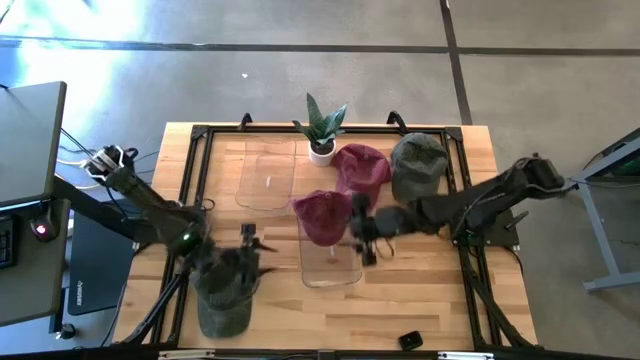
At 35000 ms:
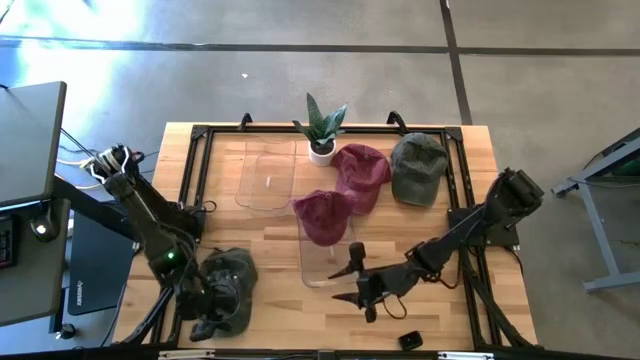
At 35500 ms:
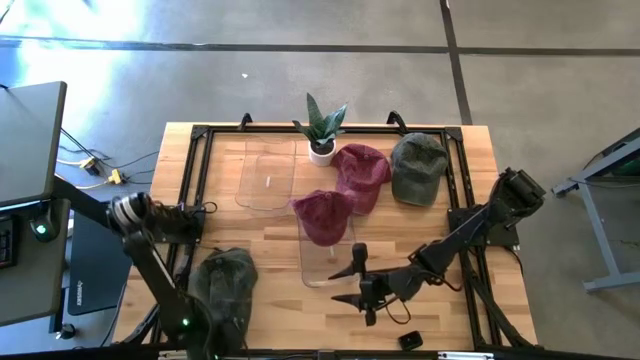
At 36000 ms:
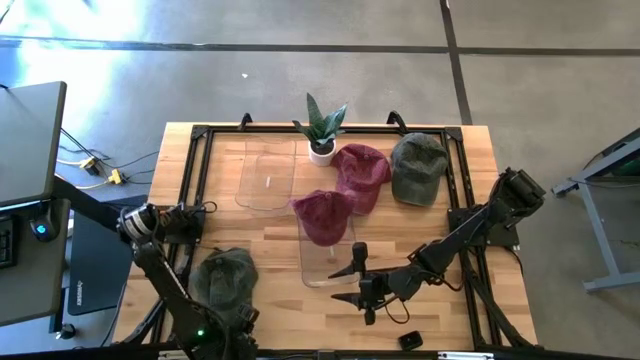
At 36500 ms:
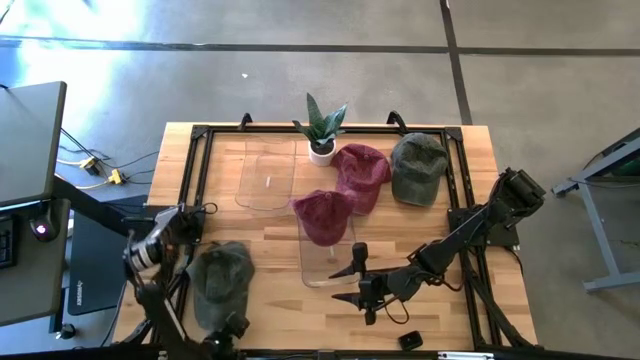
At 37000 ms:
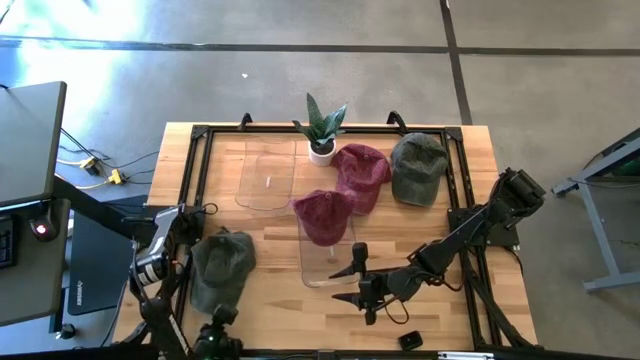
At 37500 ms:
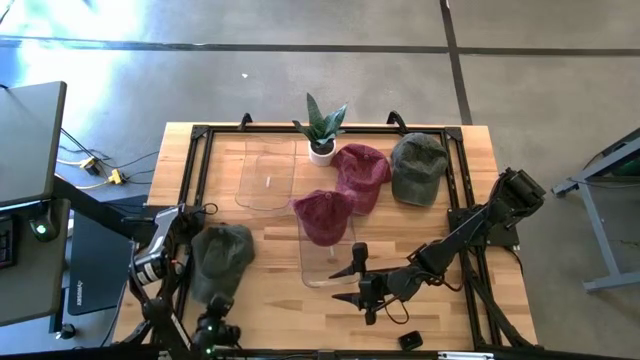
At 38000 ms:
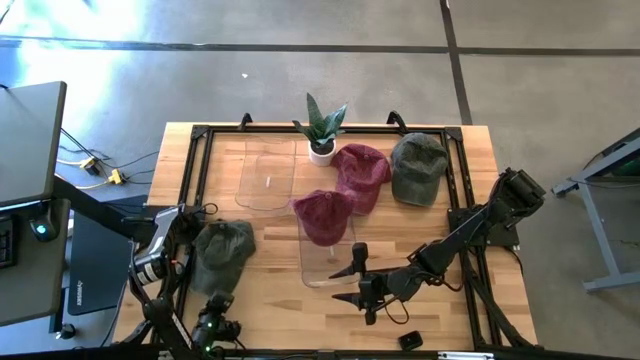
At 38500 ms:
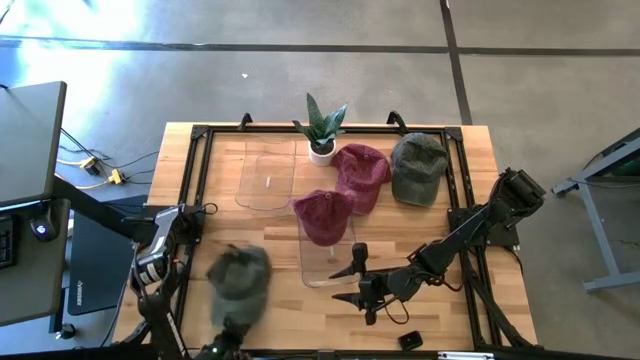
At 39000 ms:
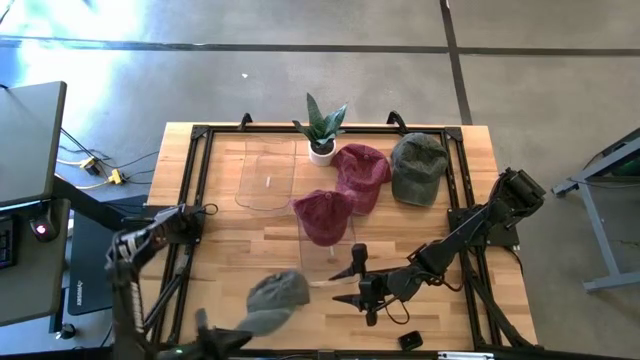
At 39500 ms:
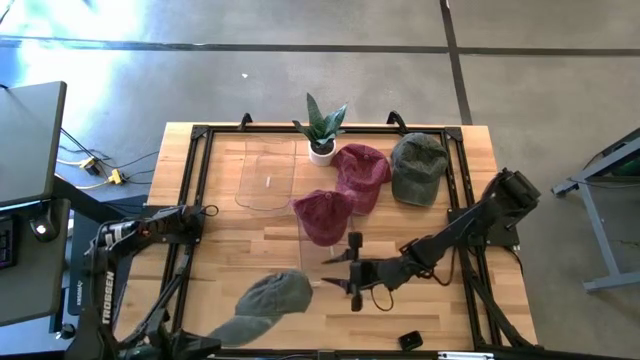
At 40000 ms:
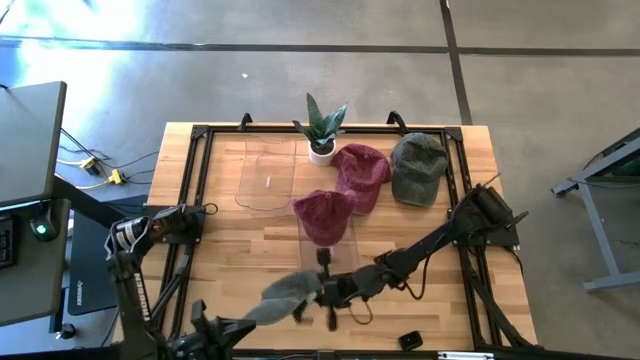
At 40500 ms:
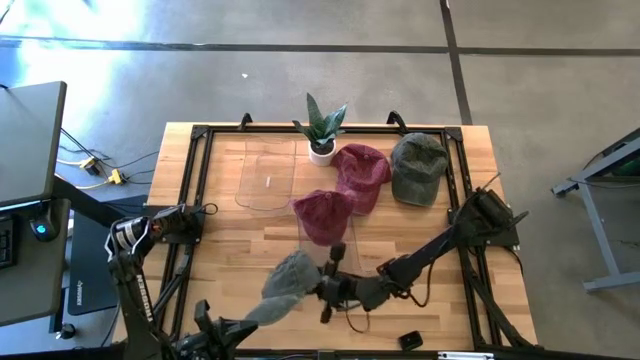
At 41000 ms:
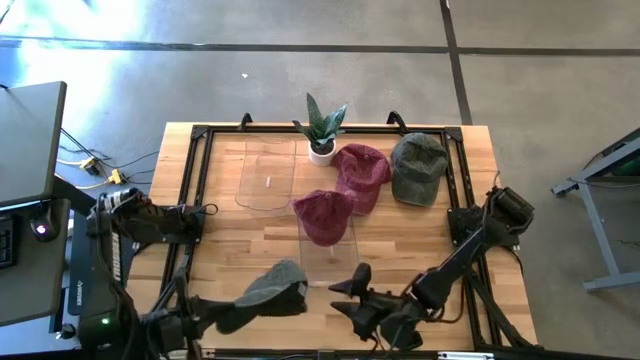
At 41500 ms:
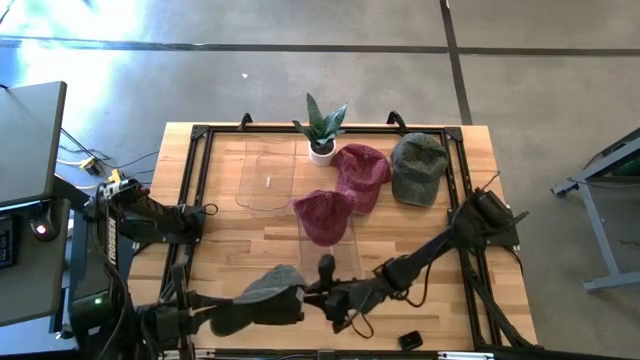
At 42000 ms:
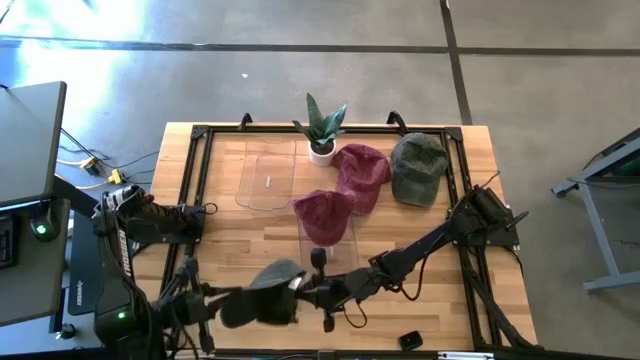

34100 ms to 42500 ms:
Task: Pick & Place hat
Put the bottom black cap into the top transparent bin

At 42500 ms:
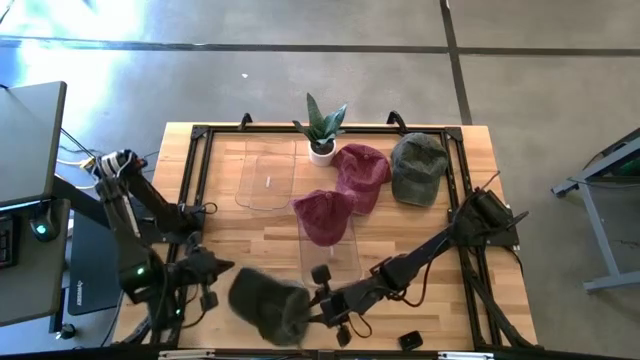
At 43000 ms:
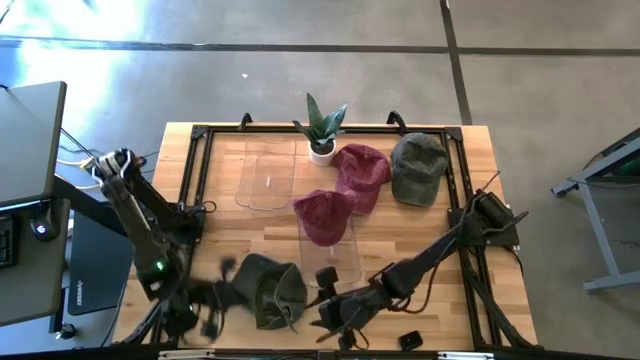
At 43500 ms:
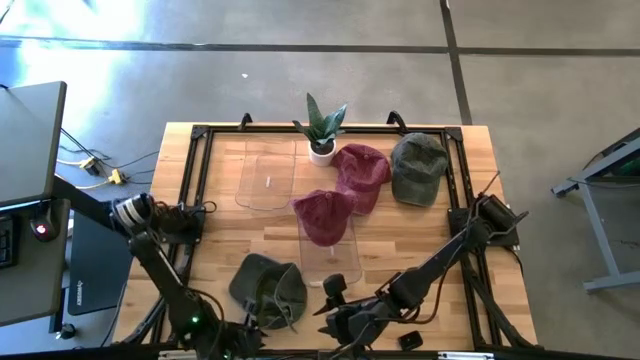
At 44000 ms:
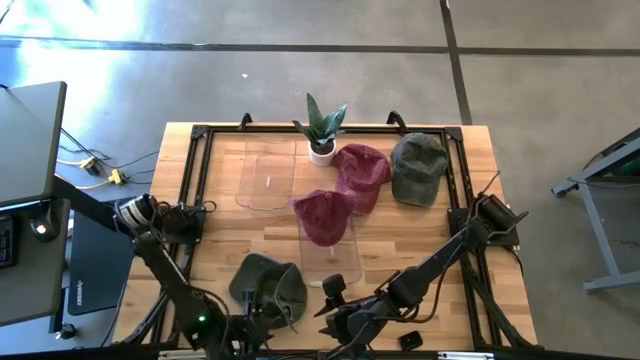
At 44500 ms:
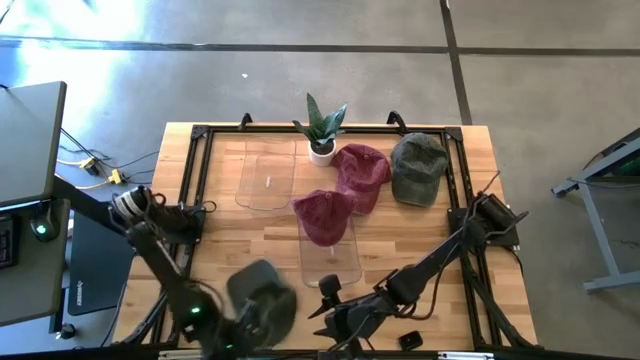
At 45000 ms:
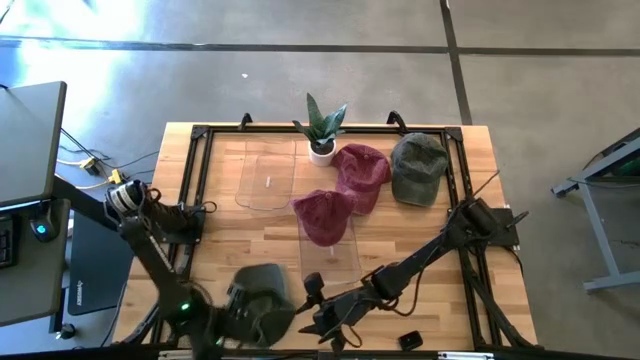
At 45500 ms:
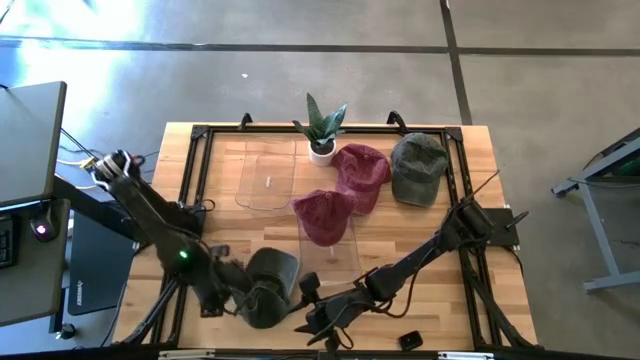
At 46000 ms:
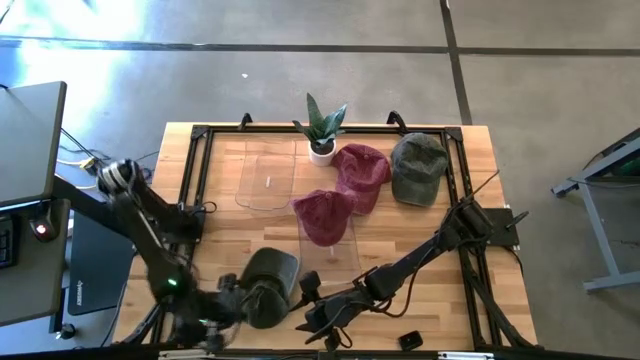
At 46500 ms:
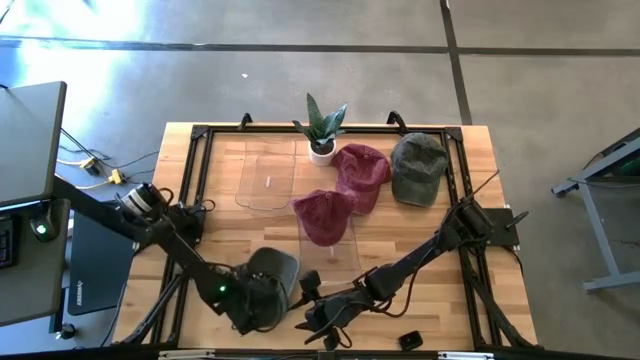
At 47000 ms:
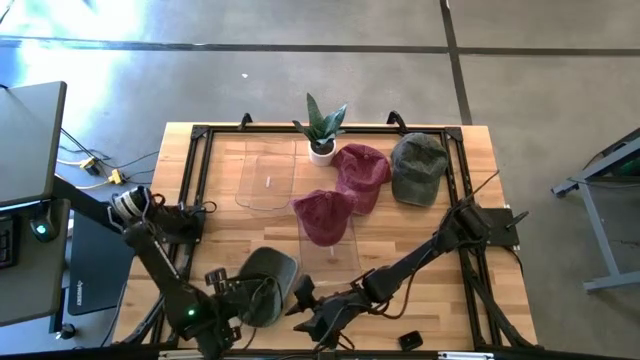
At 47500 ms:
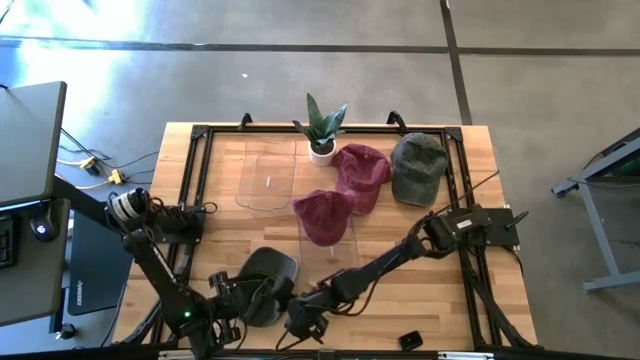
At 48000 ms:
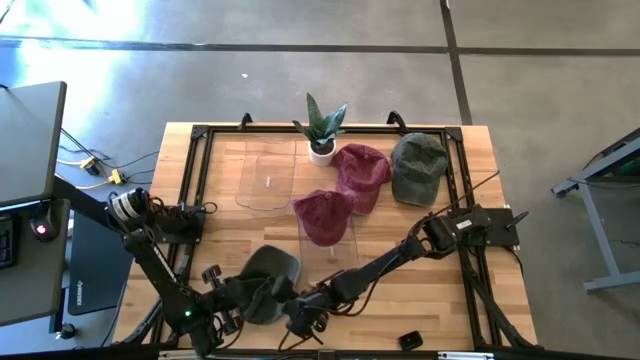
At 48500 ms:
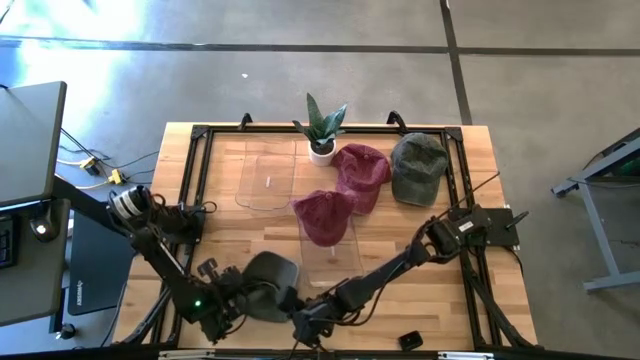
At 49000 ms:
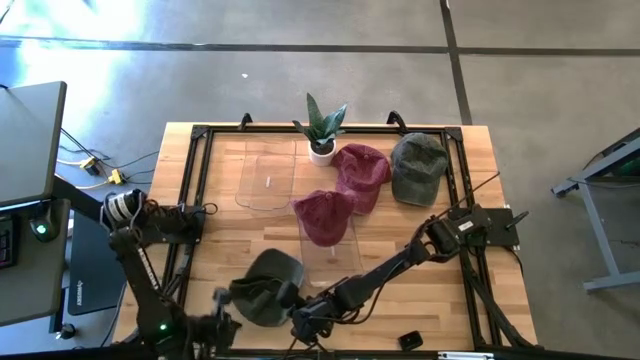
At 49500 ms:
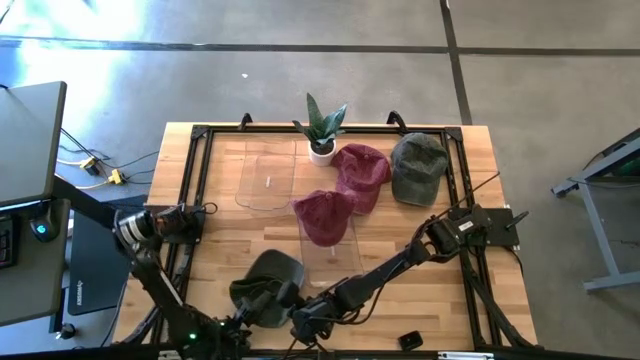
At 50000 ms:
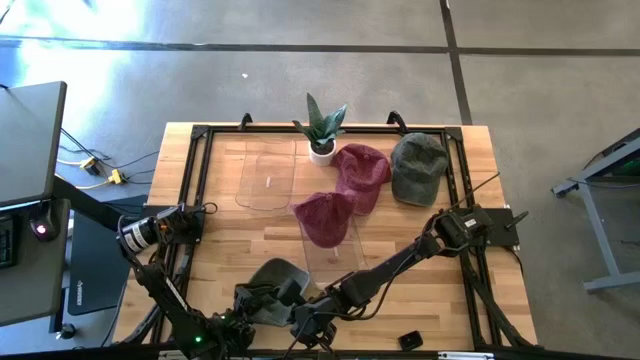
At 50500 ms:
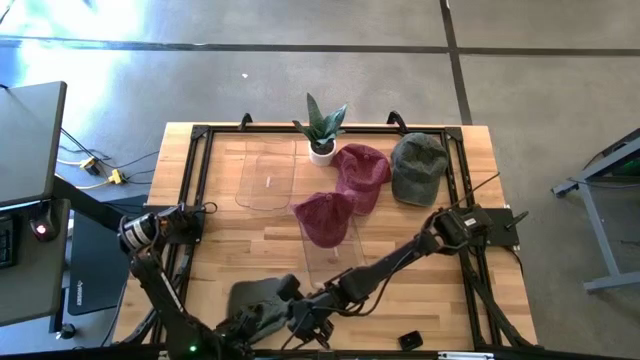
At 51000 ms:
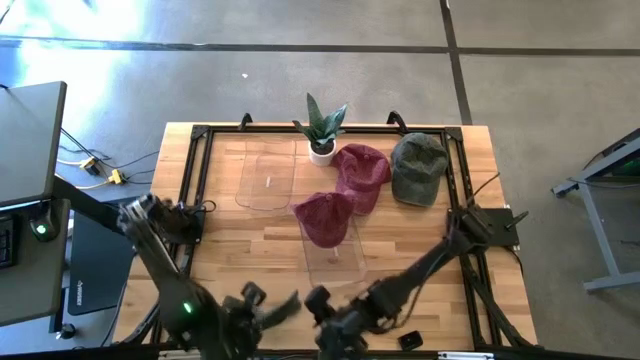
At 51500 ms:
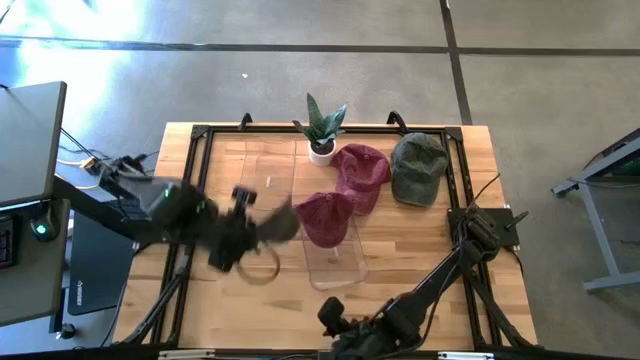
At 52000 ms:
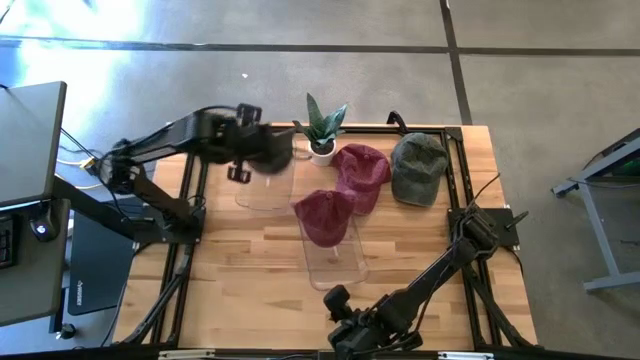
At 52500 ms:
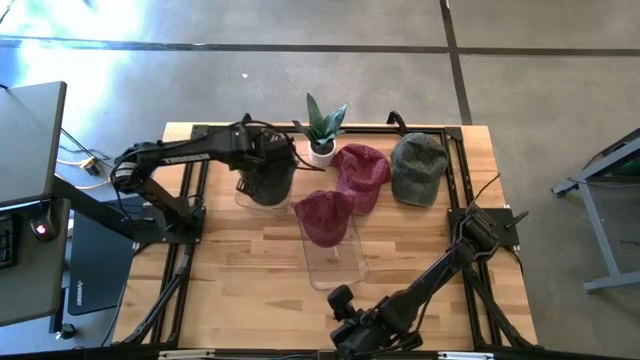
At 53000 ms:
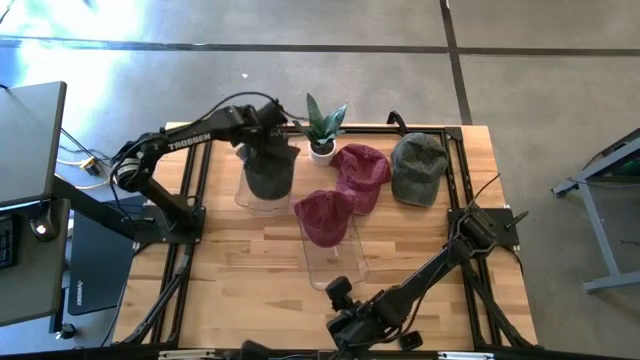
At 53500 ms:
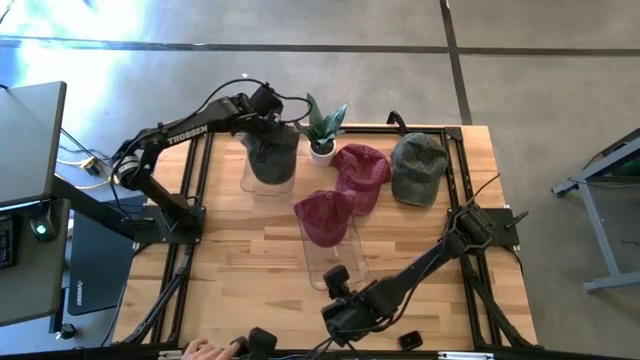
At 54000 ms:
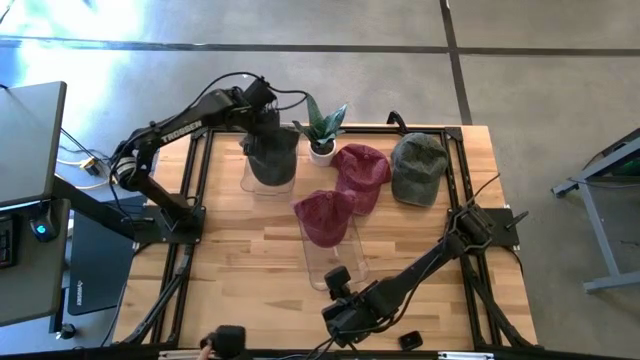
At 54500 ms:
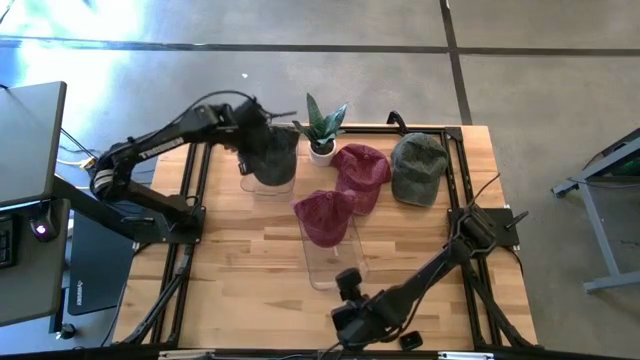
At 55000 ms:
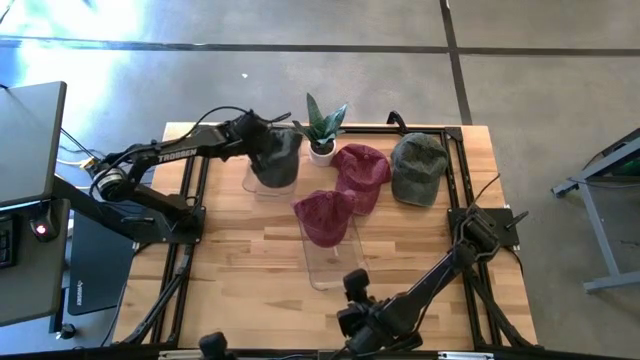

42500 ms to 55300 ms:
Put the bottom black cap into the top transparent bin

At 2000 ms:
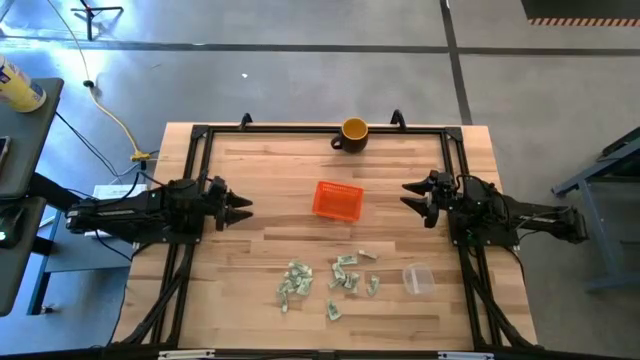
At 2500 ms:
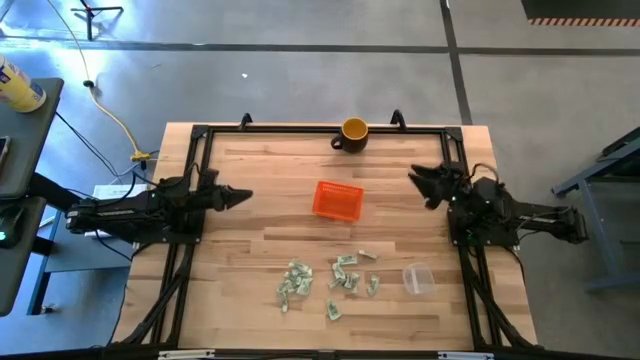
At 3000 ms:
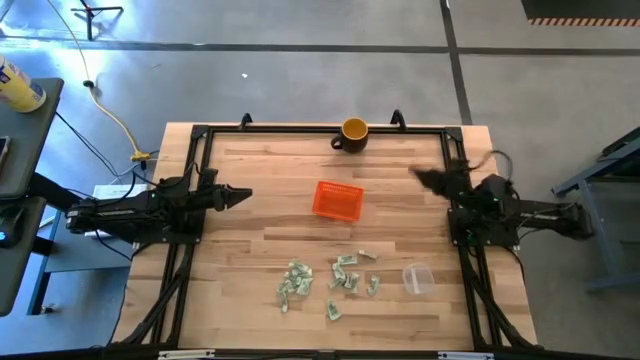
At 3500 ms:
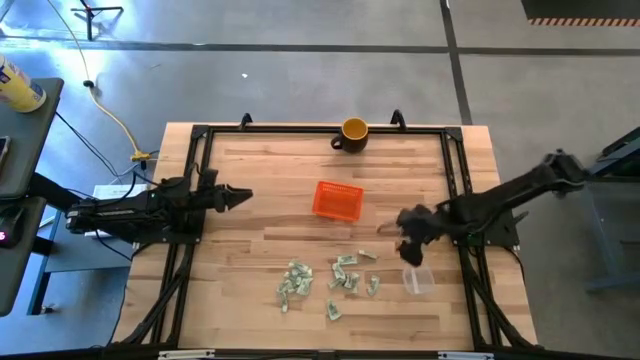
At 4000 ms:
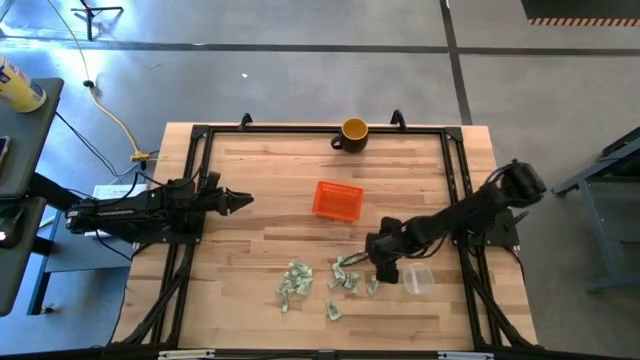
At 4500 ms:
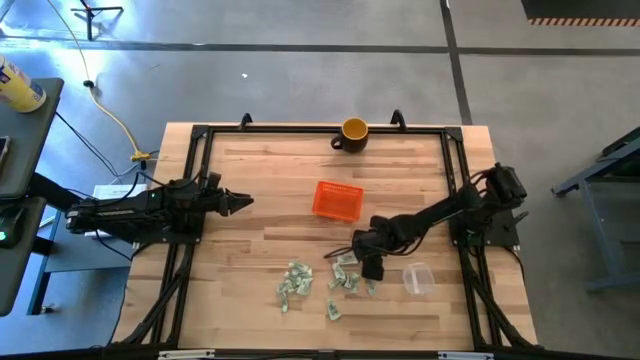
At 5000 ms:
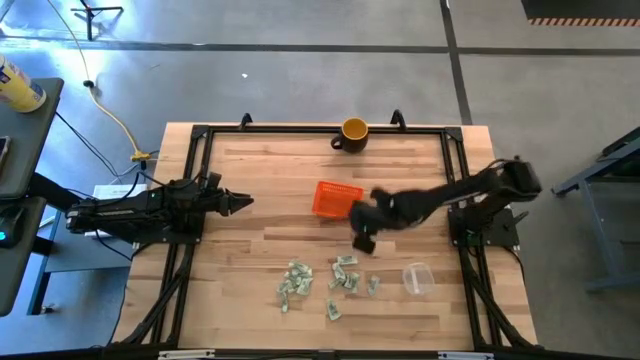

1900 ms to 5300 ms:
Task: Pick and place items into bin
Put the white stevia packet into the orange bin
